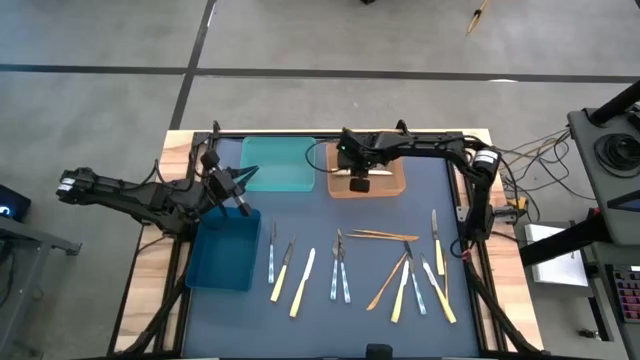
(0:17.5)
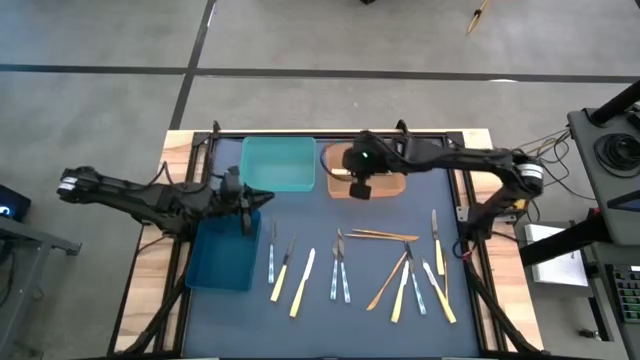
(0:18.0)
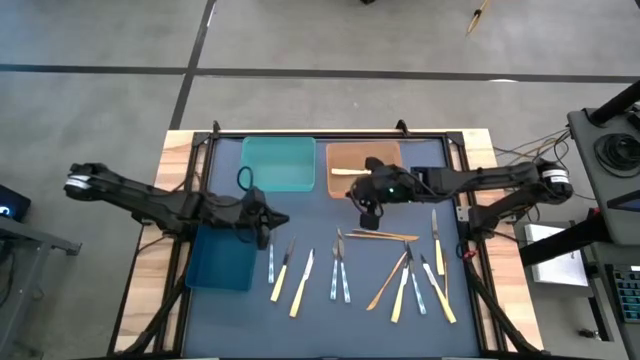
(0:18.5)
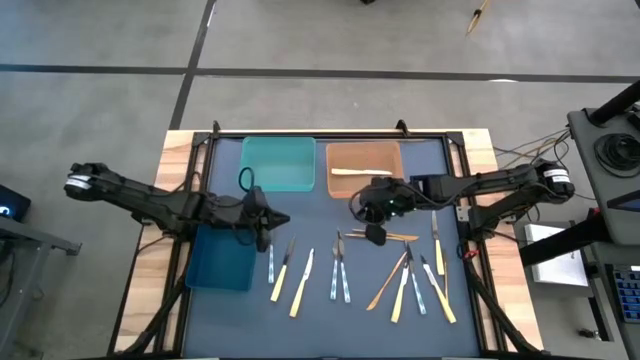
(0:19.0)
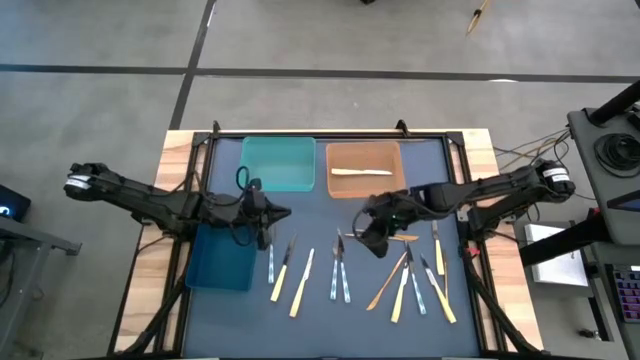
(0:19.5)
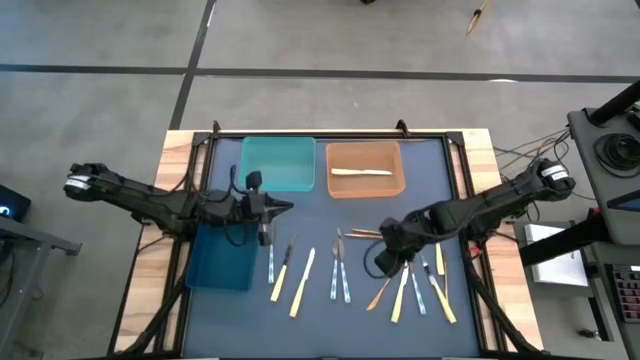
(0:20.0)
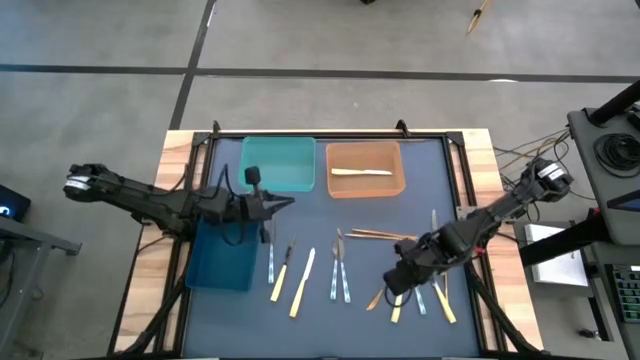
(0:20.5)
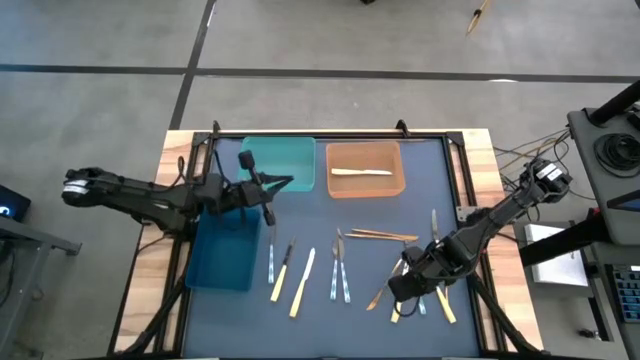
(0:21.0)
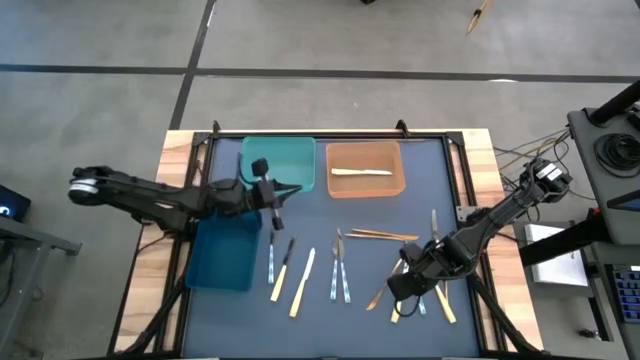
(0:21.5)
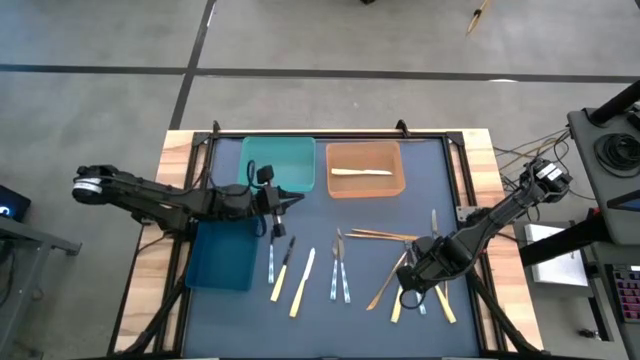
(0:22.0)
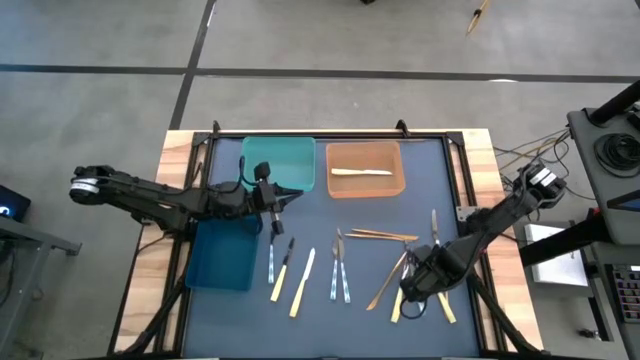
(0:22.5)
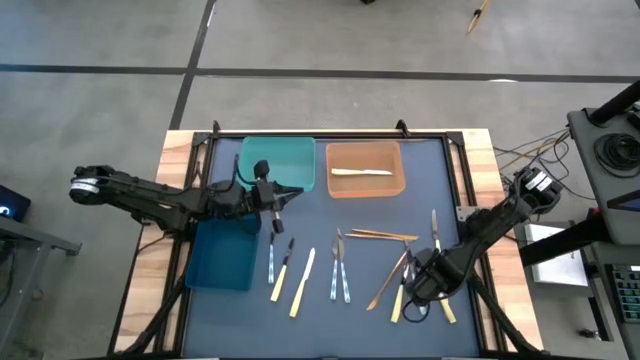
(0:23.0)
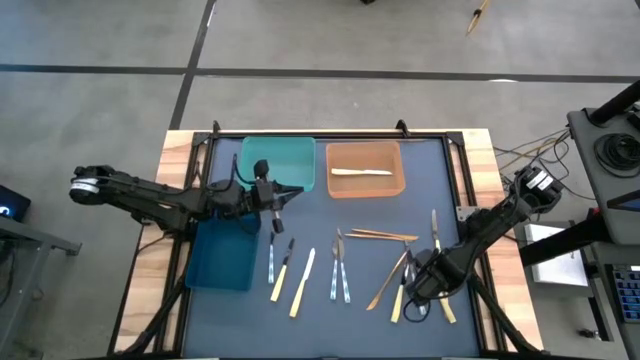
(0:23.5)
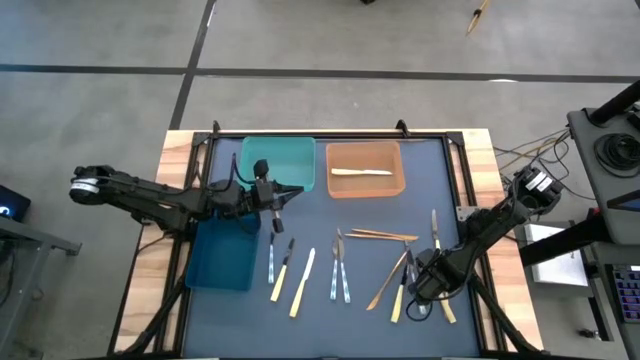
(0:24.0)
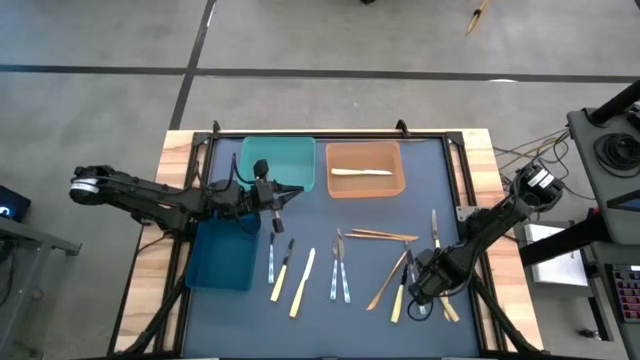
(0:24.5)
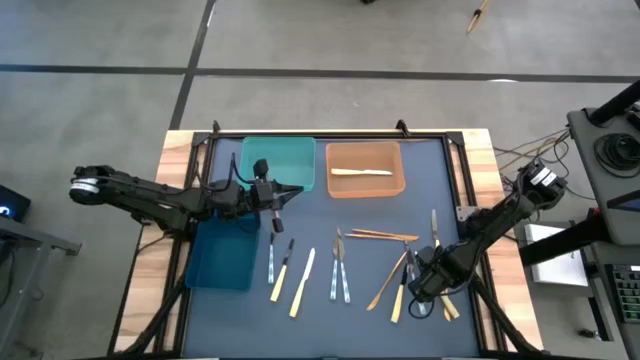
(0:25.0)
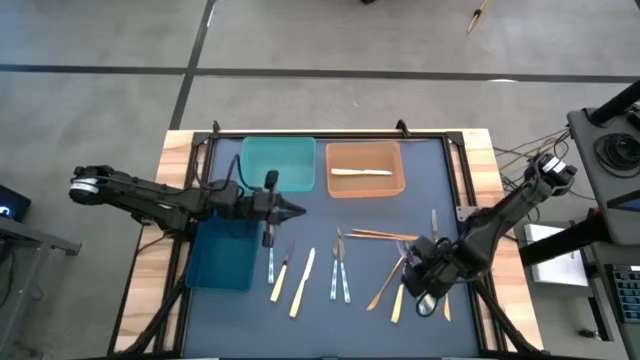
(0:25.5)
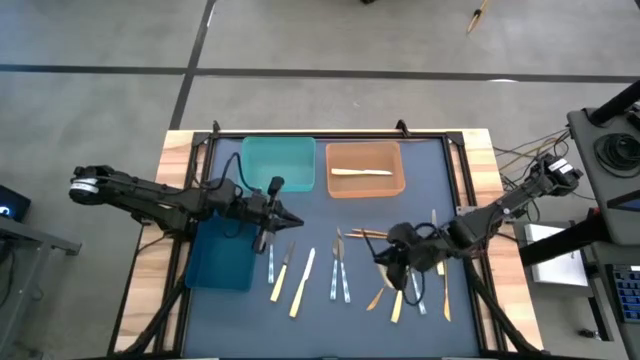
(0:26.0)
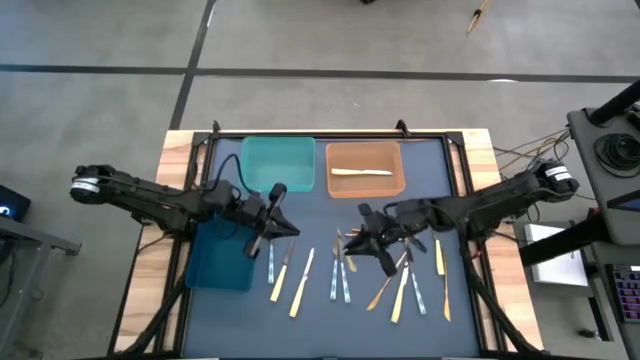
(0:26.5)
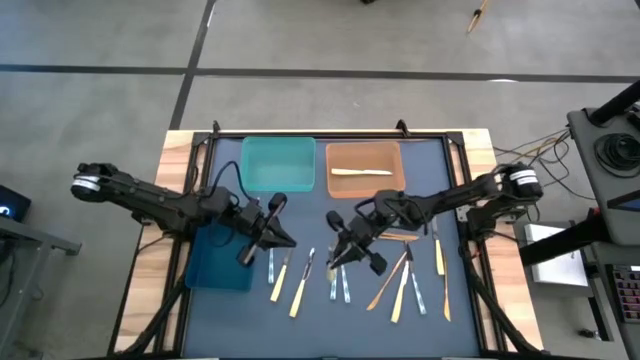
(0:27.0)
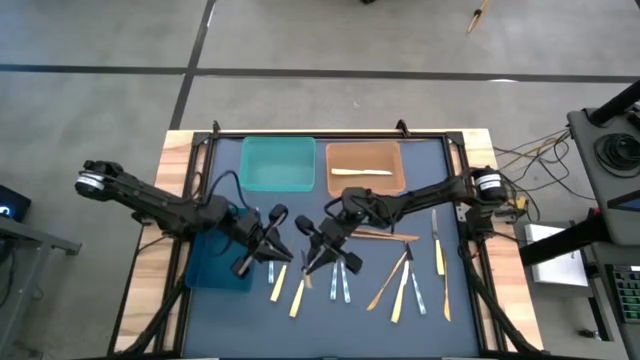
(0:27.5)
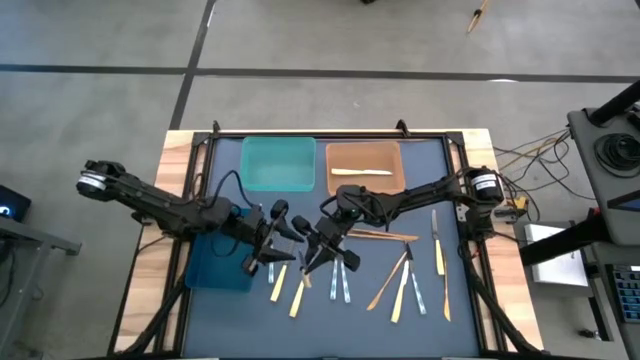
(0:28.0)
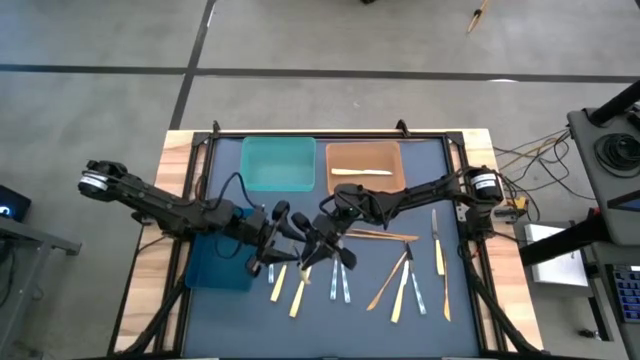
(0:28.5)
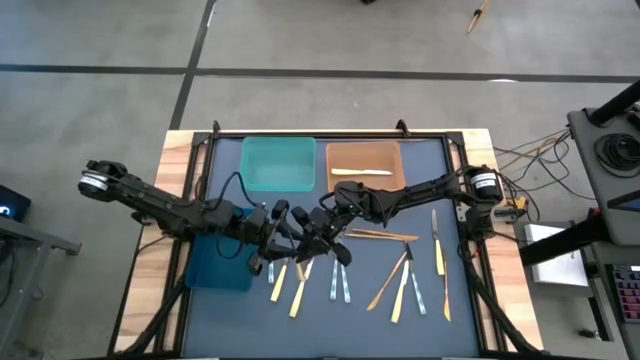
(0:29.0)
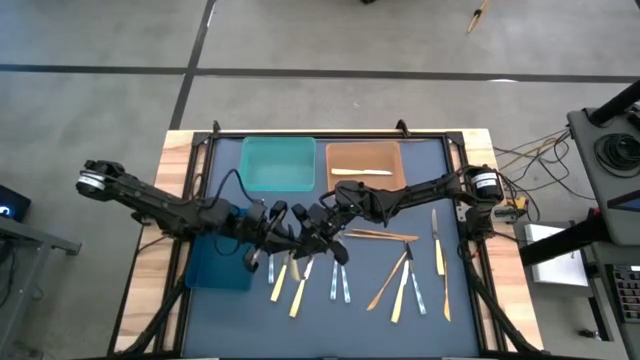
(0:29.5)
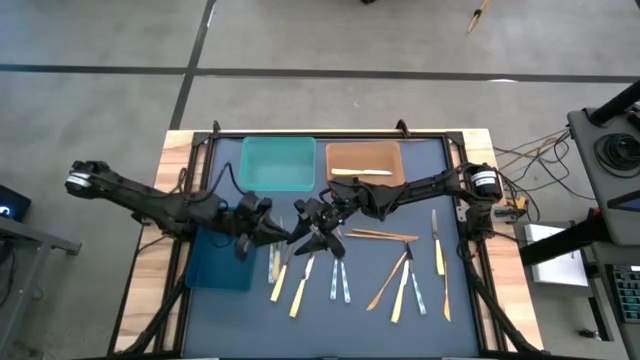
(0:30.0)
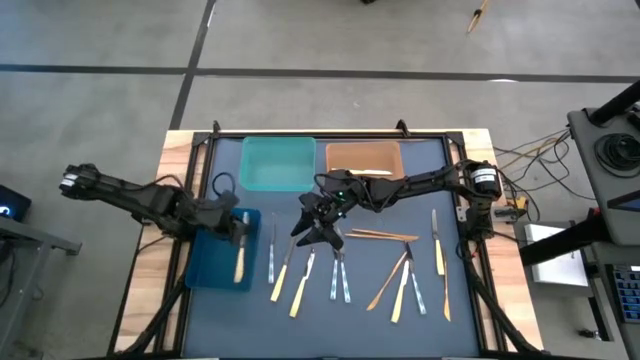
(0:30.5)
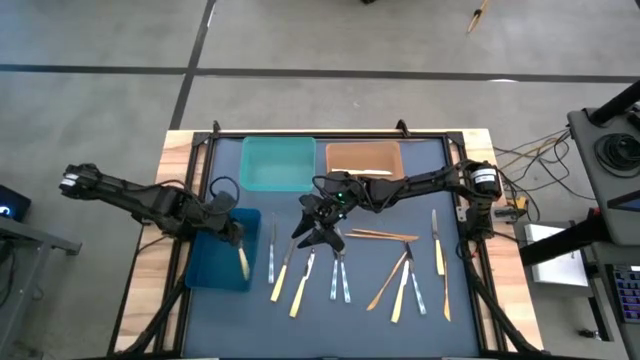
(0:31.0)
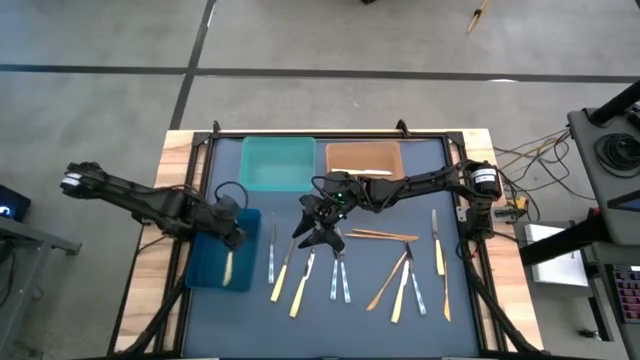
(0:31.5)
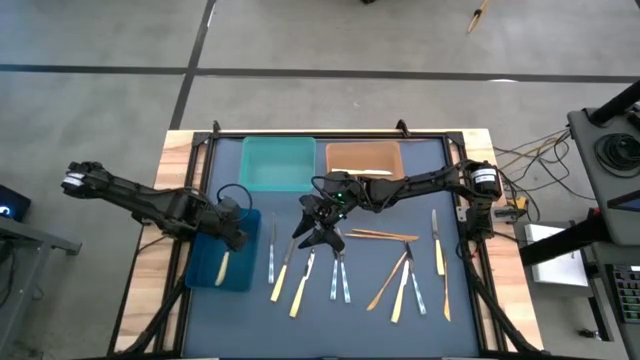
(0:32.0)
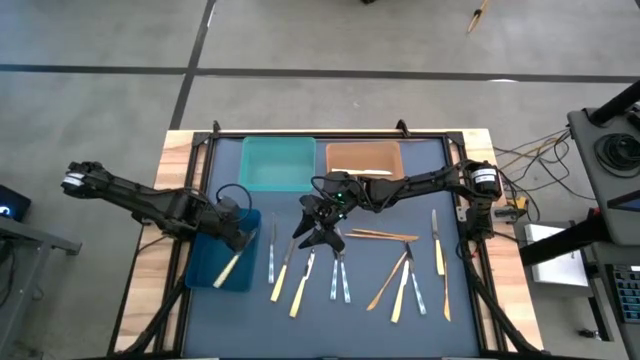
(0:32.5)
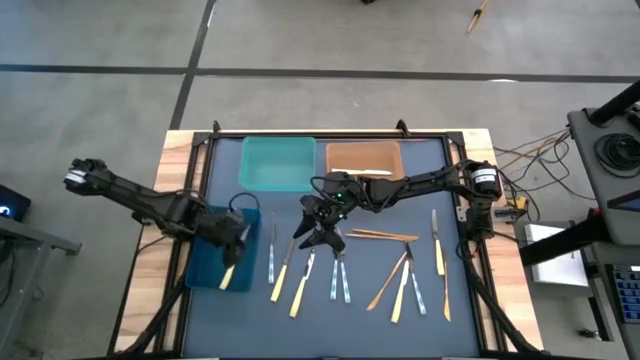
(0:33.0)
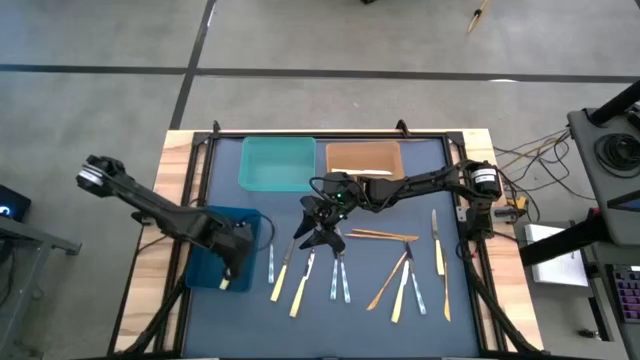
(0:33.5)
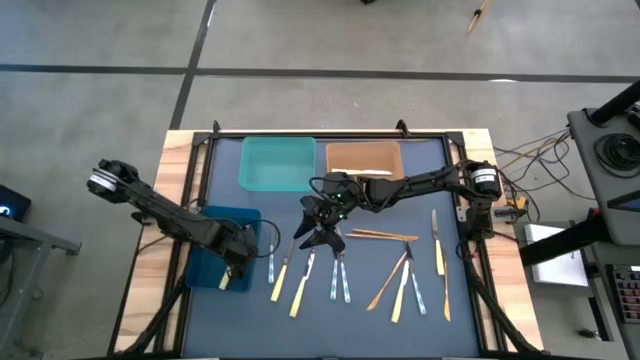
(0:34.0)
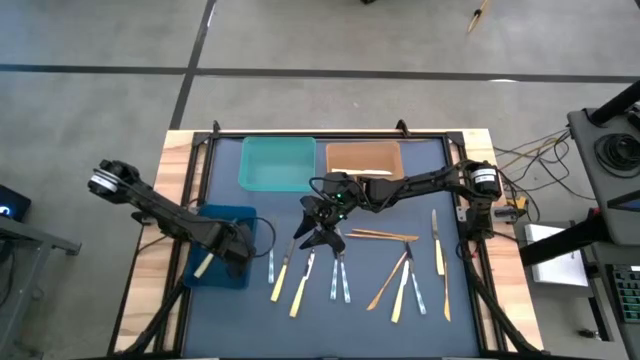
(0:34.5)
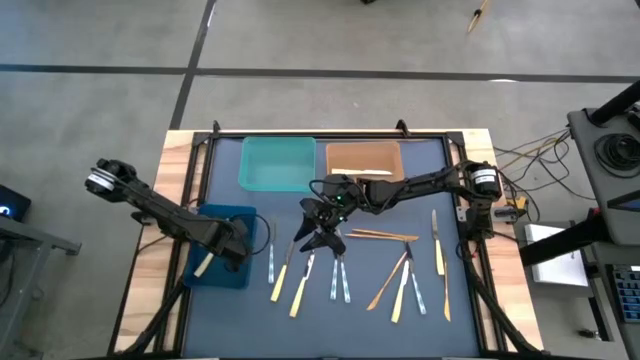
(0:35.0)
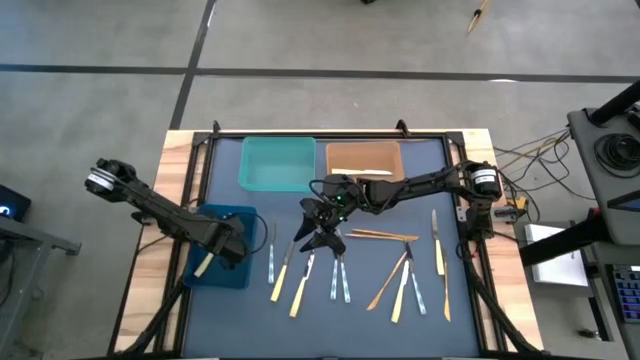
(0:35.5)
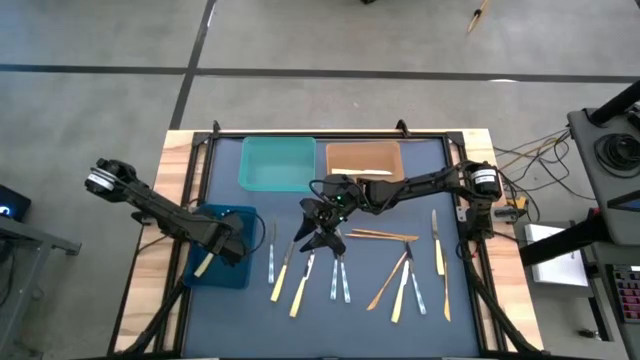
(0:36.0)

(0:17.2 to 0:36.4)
Task: Sort silverware by color (type)
Put the light yellow knife into the blue bin

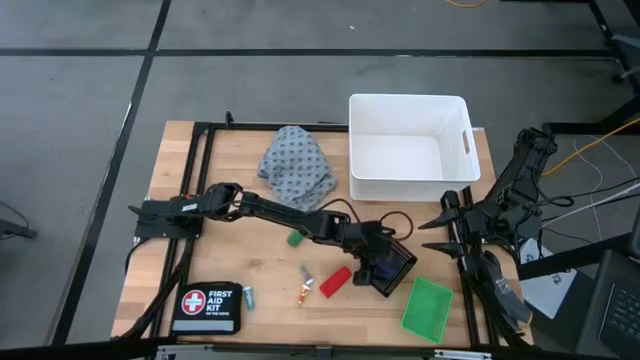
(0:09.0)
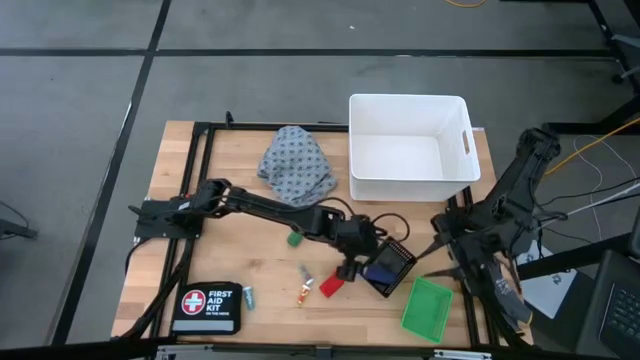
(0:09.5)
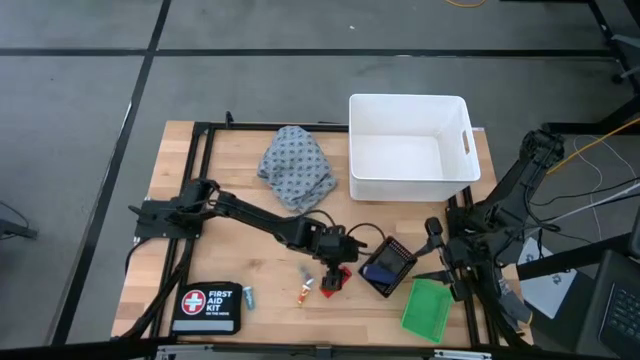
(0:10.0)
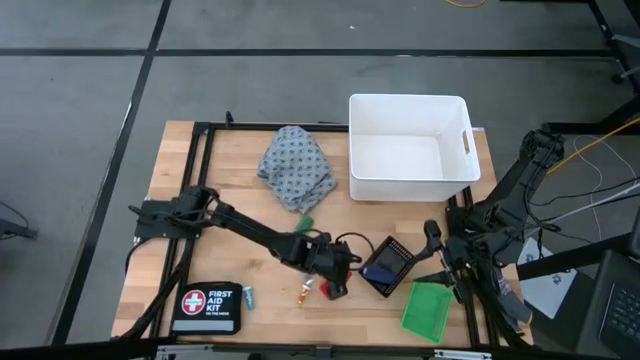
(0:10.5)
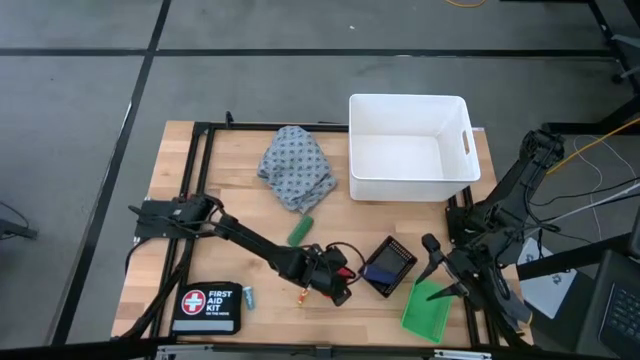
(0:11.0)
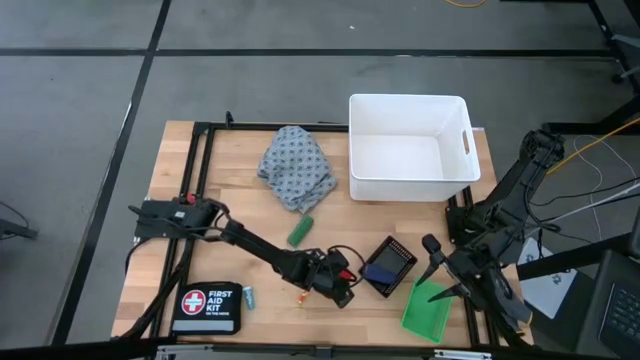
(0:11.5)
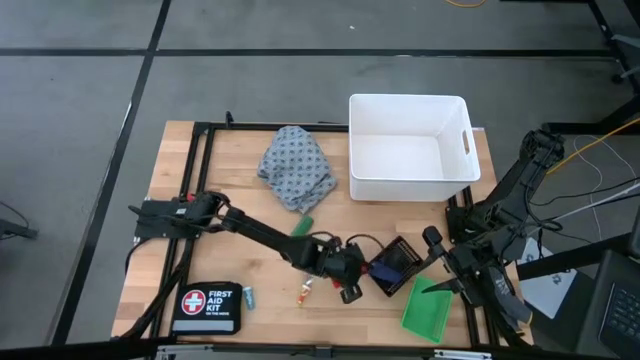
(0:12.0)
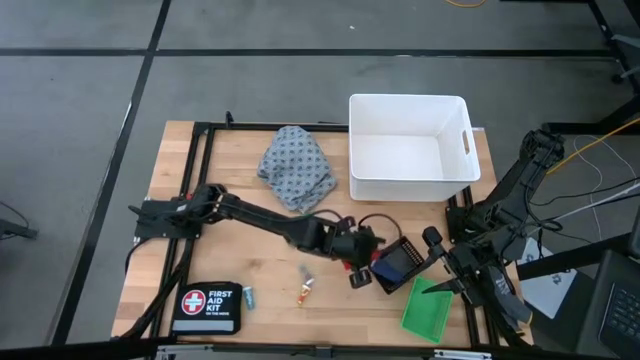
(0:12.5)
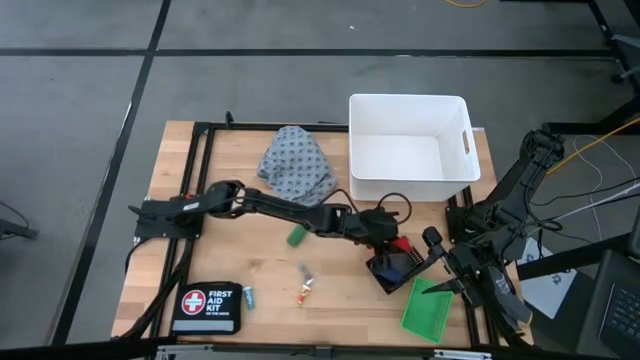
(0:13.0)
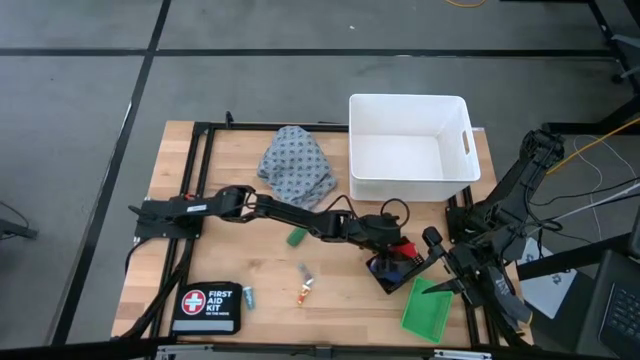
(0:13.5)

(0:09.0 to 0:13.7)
Task: Pick & Place Medicine items
Put the red bandage into the black bin
